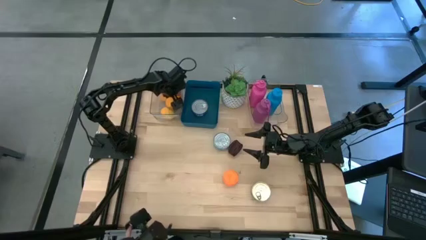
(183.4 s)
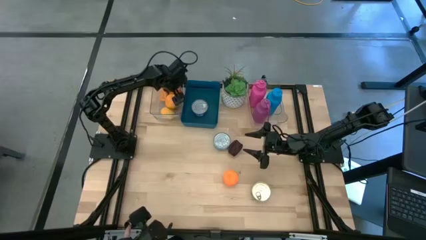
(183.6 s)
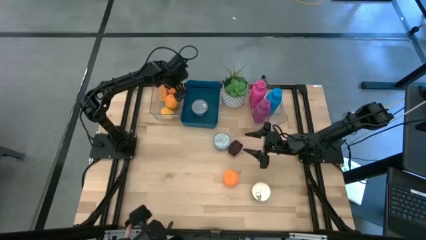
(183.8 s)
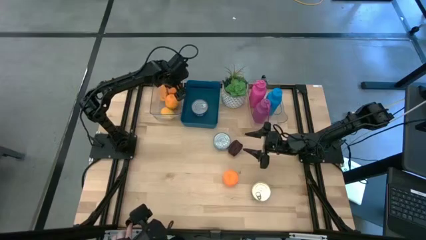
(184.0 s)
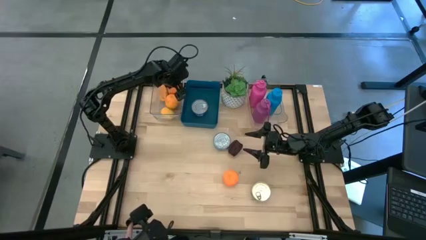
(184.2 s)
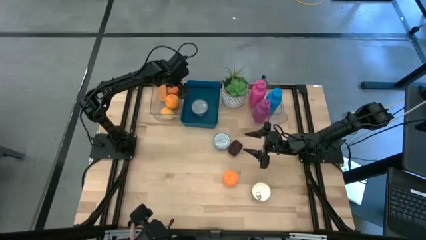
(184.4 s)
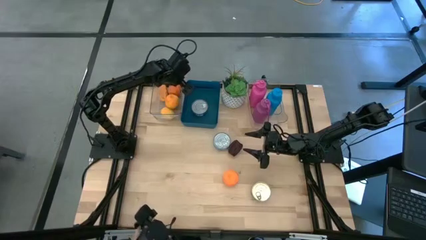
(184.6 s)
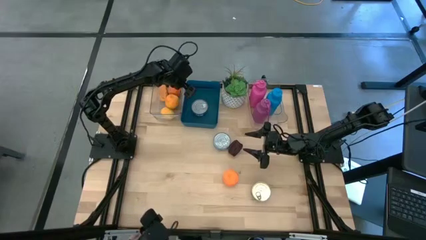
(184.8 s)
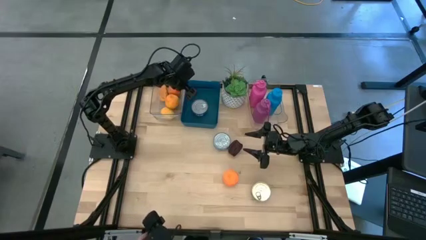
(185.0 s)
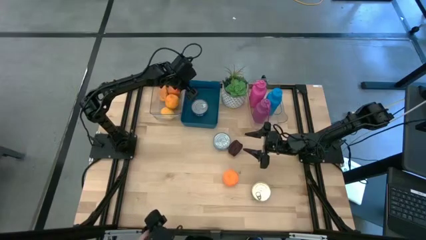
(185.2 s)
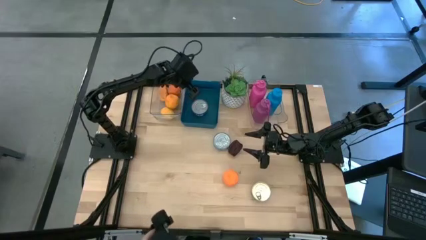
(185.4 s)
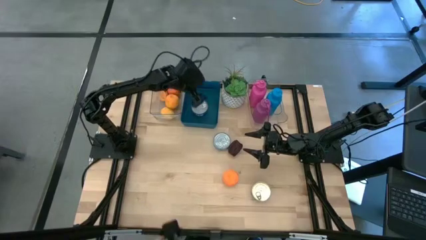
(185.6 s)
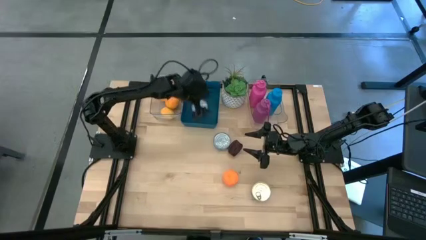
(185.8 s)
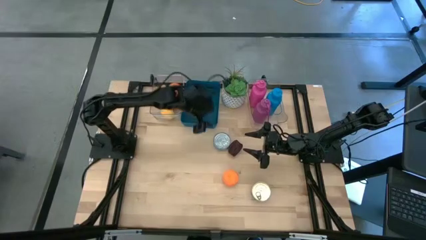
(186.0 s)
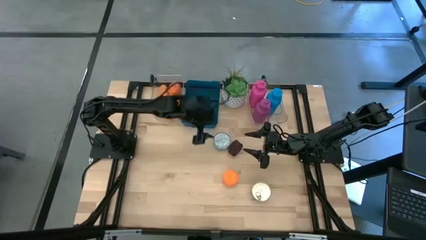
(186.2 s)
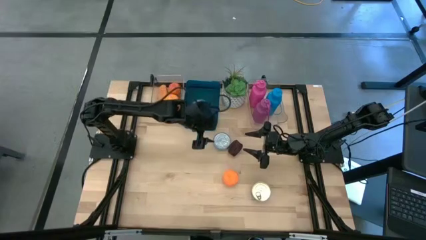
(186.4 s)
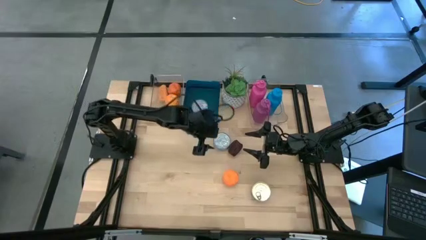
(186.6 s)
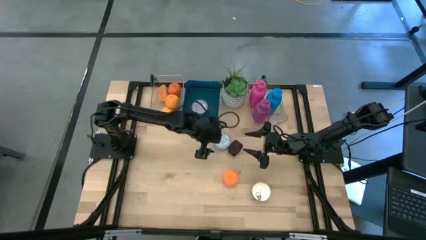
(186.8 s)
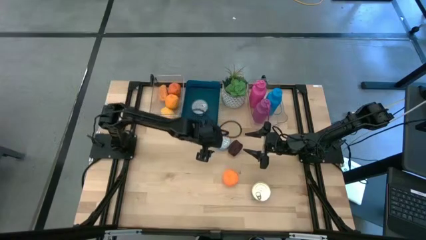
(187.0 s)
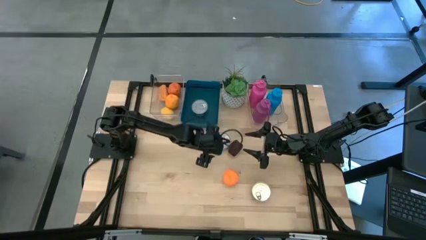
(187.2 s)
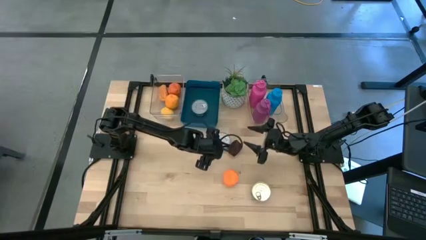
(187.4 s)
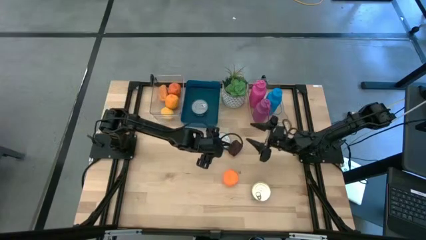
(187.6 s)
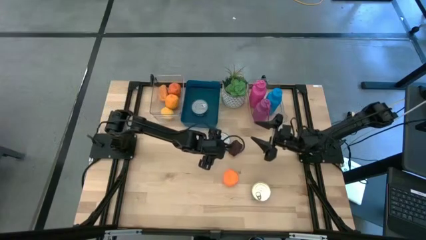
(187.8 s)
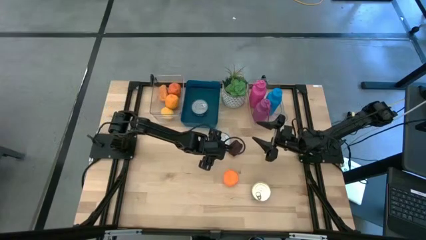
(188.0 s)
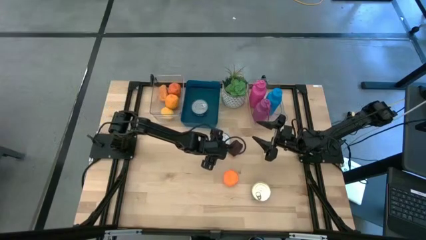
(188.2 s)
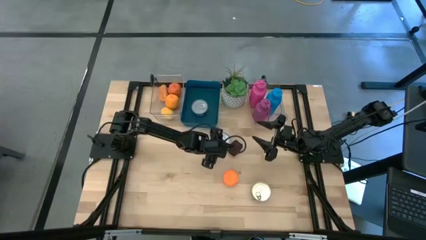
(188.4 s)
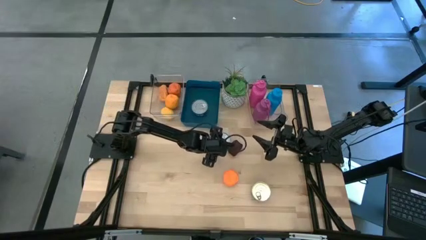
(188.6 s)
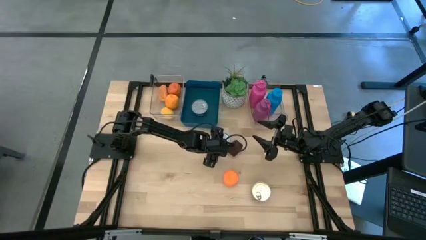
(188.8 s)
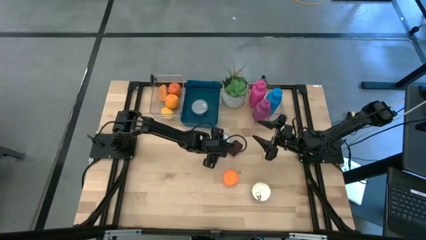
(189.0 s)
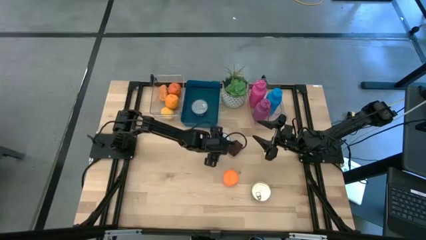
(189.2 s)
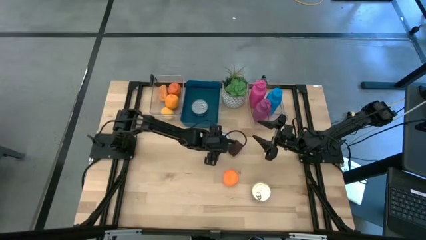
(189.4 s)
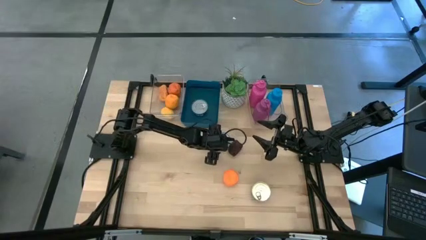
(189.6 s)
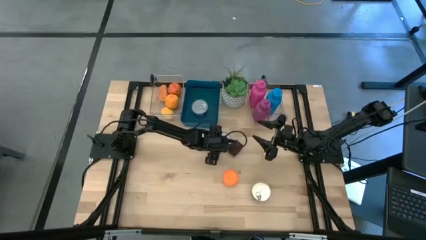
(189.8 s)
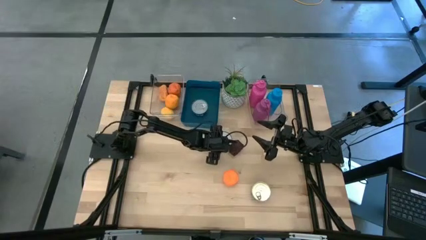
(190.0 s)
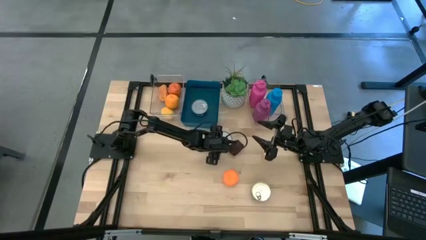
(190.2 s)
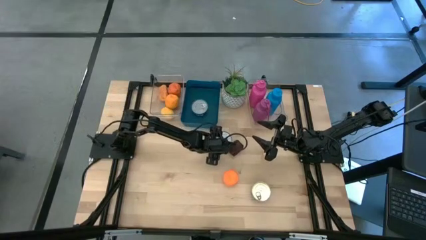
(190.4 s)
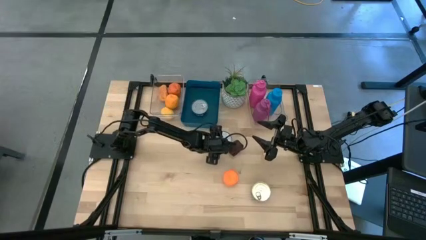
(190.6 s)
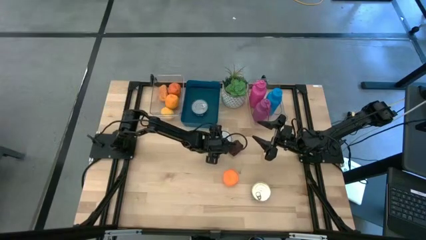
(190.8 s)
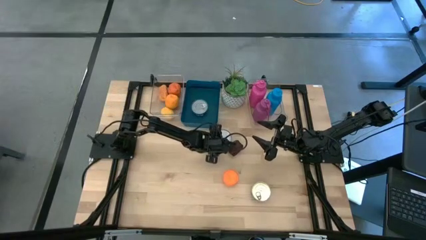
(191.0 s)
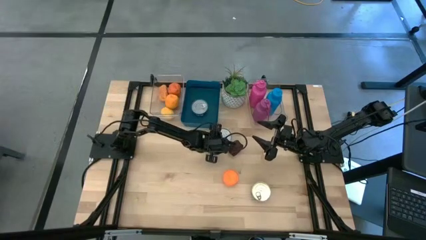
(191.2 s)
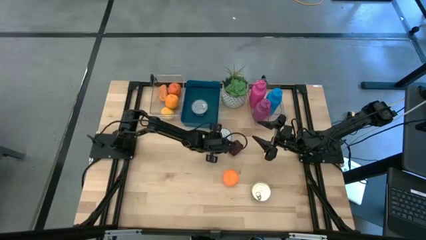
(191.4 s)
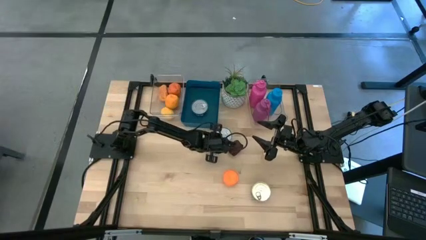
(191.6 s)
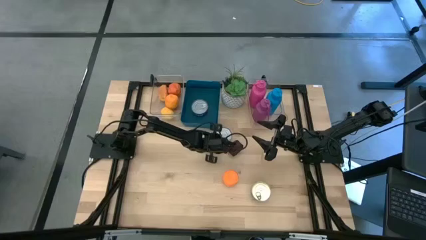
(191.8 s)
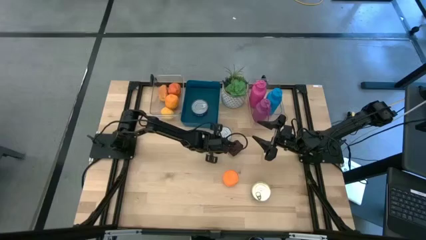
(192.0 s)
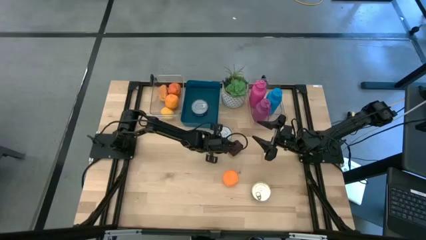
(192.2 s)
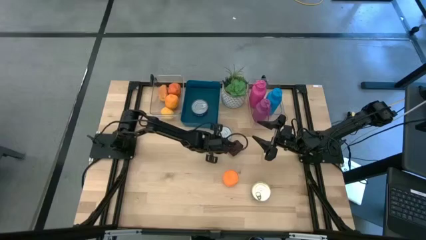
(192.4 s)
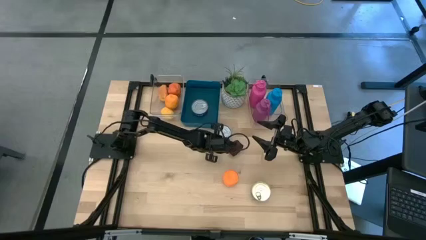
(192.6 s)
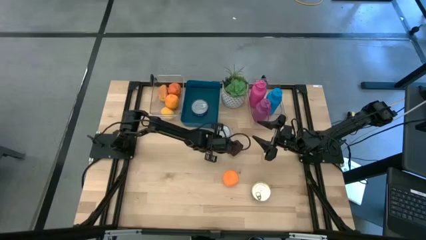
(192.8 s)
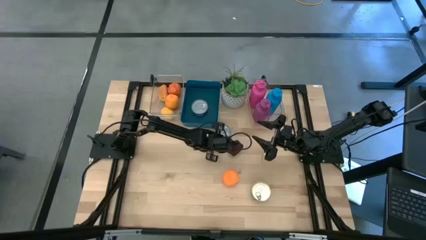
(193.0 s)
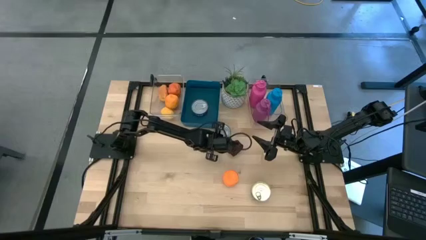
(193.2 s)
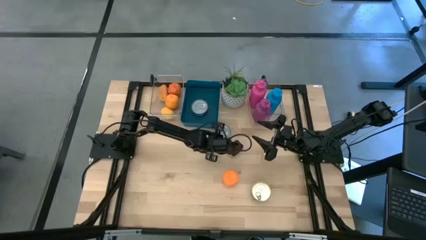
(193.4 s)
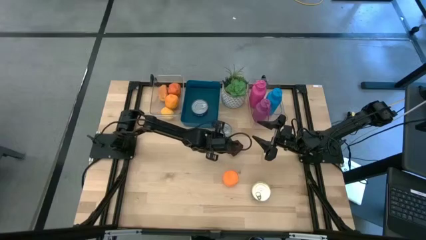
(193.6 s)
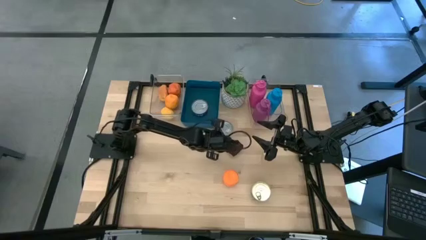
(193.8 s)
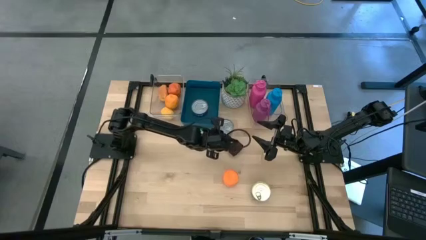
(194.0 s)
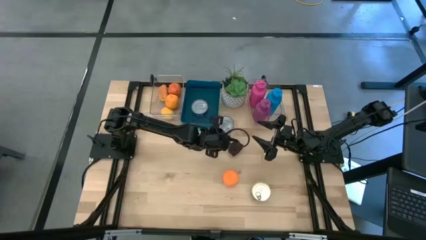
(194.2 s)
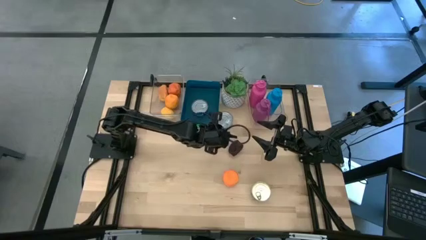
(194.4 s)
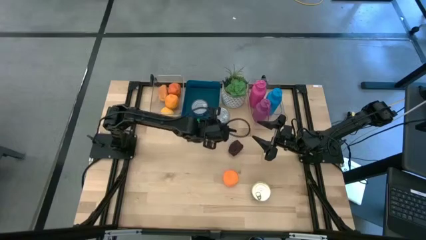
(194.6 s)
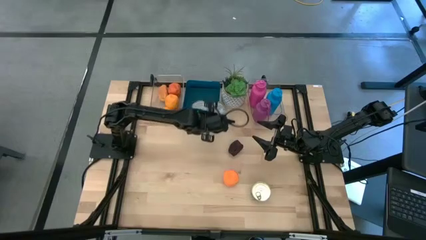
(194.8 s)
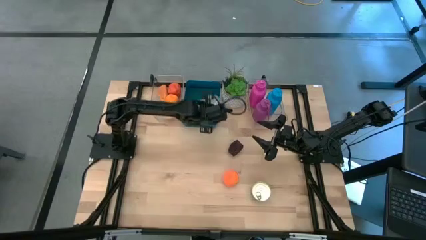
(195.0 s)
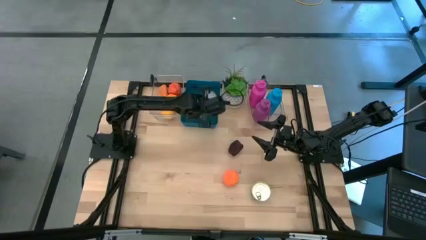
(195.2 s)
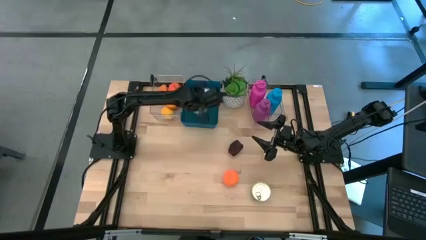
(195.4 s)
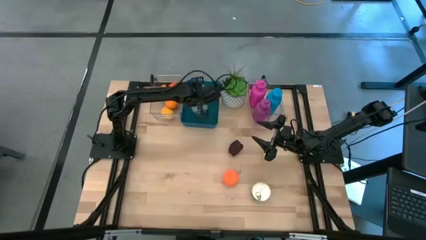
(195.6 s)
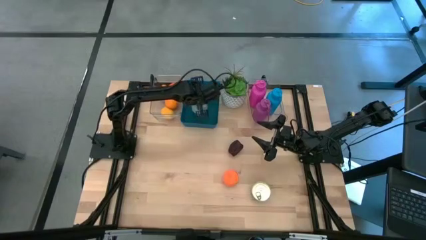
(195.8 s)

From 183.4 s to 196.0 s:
Task: Pick & Place Food Item
Put the yellow and blue tuna can into the blue bin

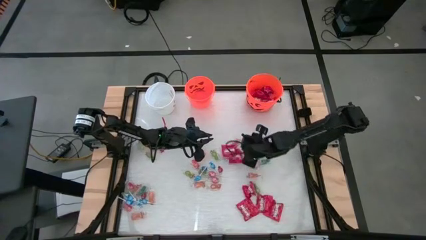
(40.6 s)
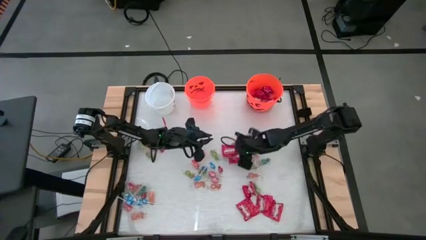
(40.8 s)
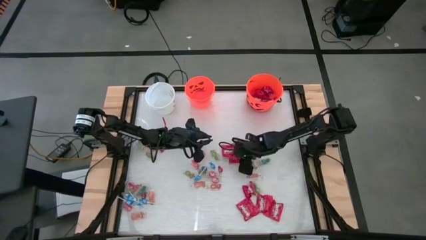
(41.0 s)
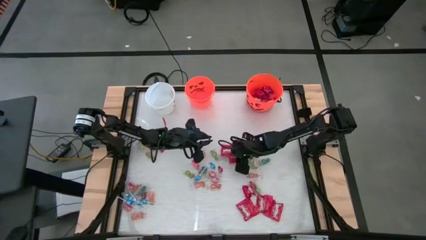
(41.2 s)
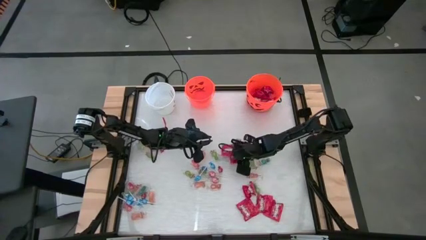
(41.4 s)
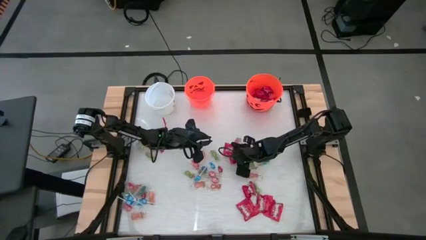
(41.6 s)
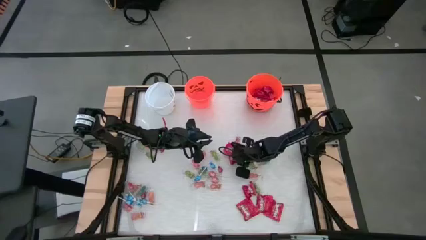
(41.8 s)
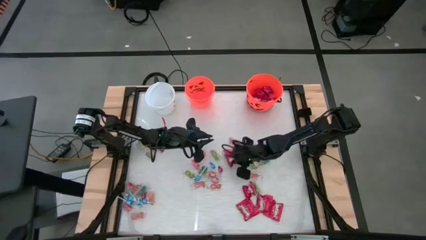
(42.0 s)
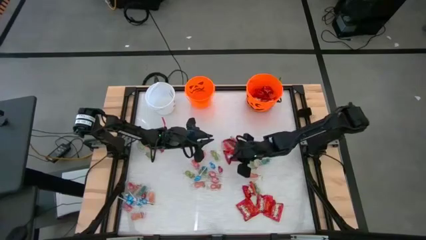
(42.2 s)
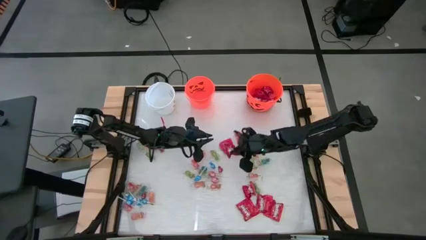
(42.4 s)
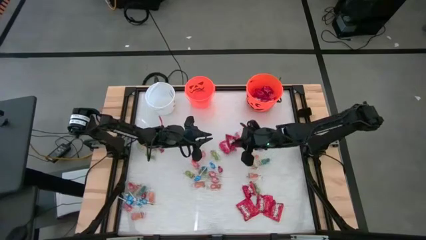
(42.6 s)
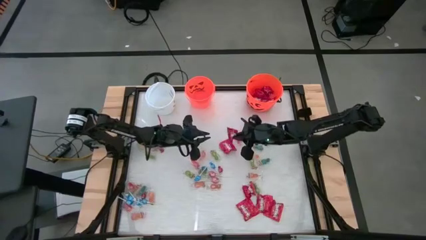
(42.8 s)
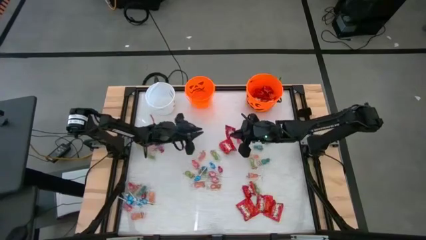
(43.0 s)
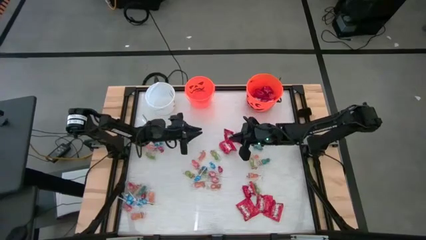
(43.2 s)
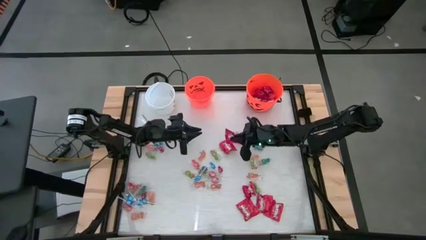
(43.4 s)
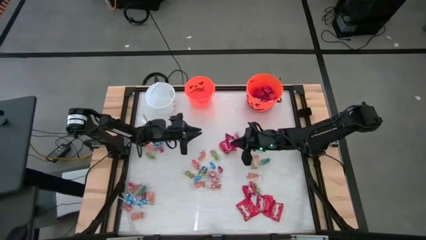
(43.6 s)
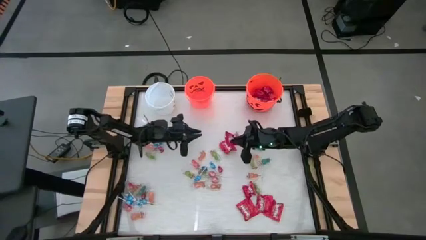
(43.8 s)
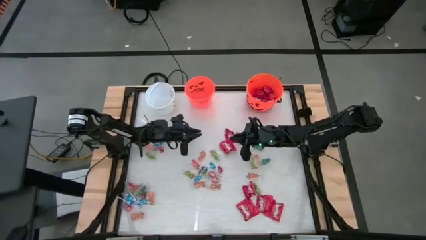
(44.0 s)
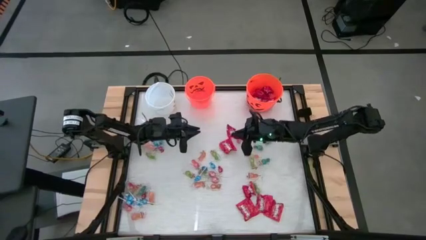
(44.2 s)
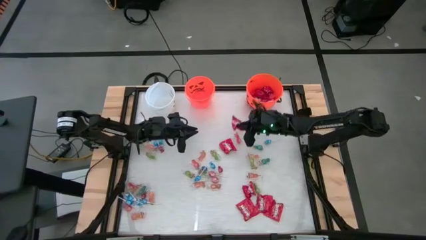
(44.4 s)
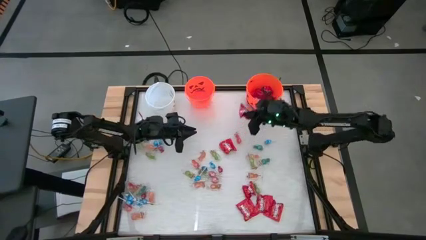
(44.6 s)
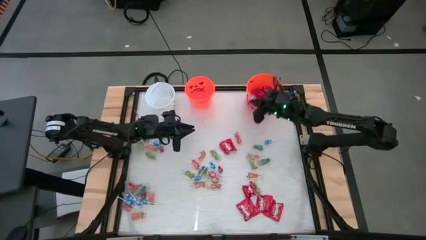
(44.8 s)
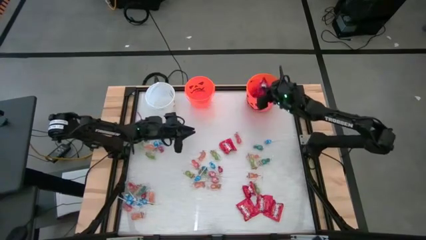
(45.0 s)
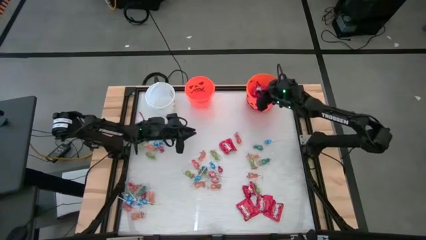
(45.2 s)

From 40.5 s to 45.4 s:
Task: Sort candy by brand, put in halloween buckets
Put the red candy into the right orange bucket

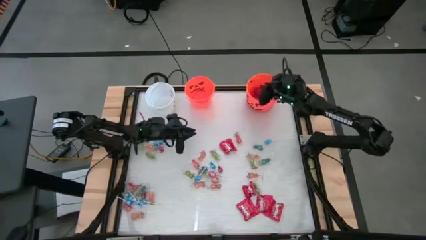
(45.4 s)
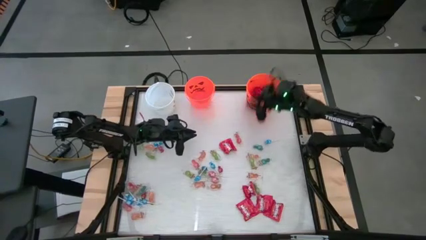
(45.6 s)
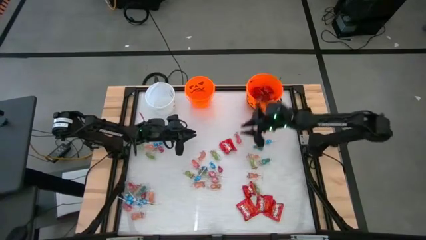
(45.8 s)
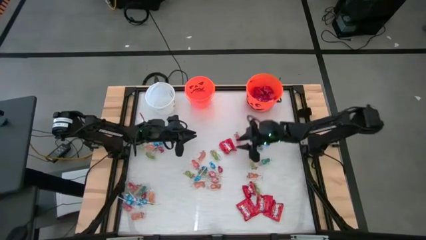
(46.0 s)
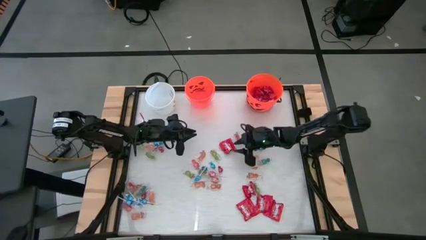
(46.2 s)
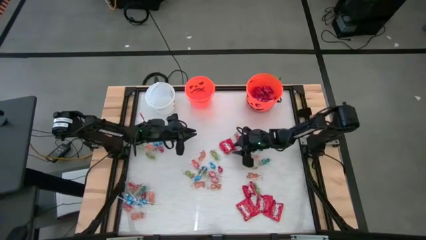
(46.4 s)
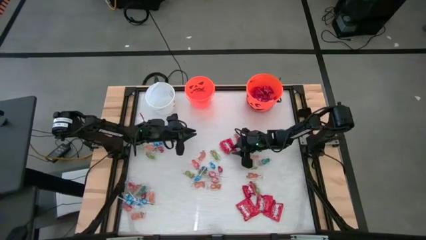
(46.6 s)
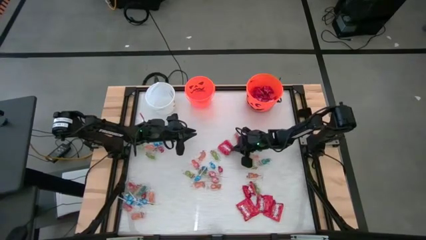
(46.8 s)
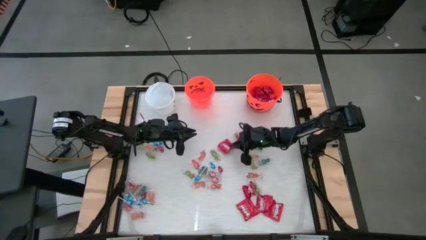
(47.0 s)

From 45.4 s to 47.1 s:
Put the red candy into the right orange bucket
